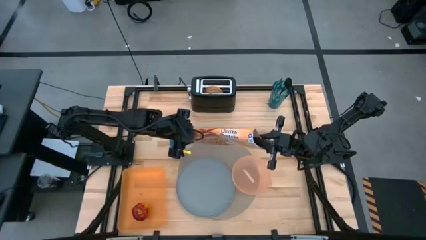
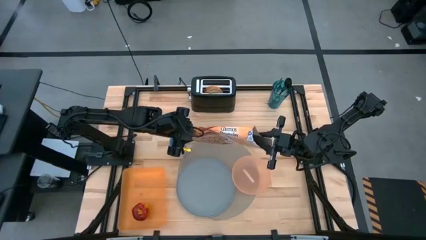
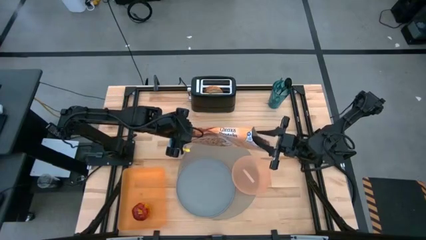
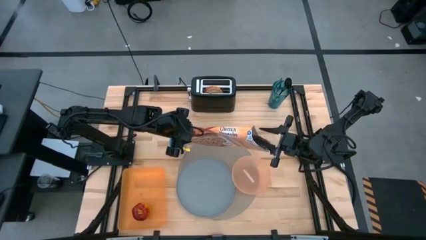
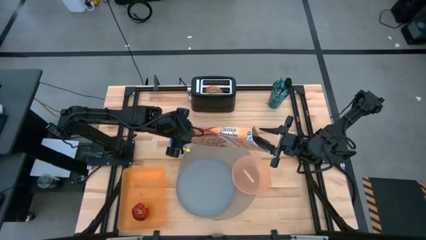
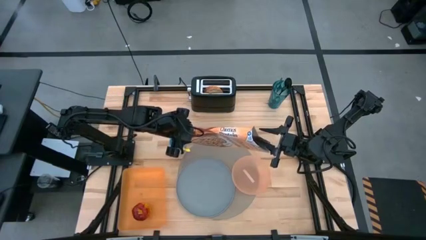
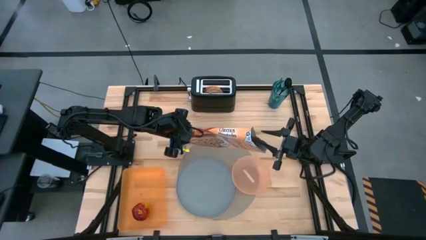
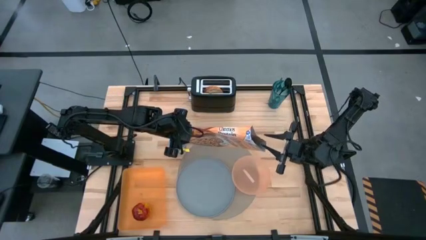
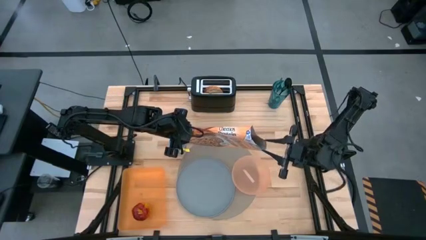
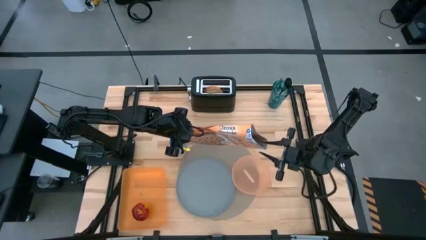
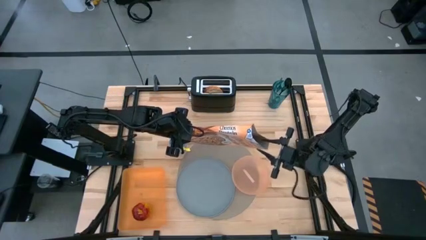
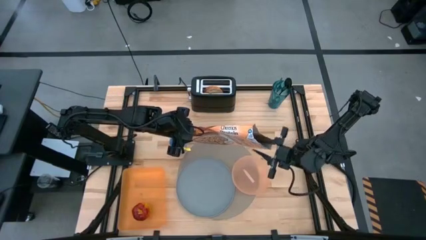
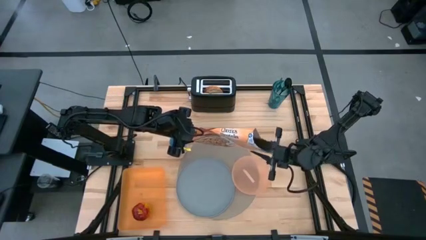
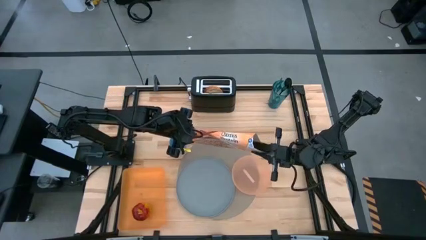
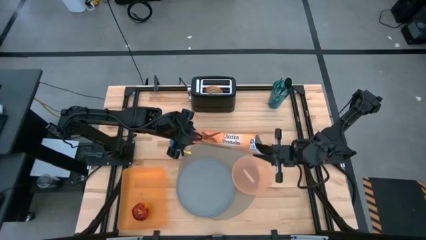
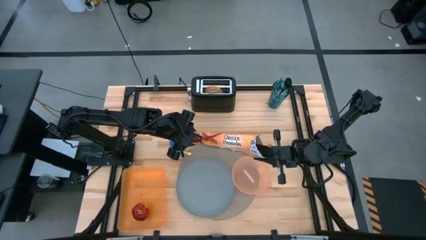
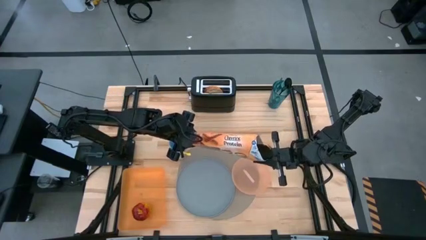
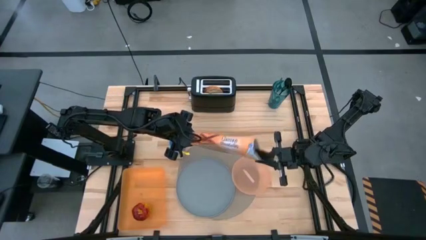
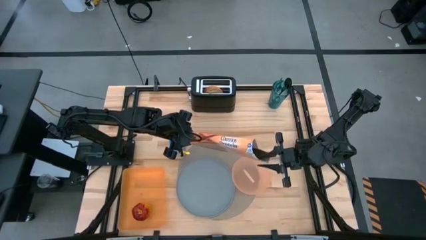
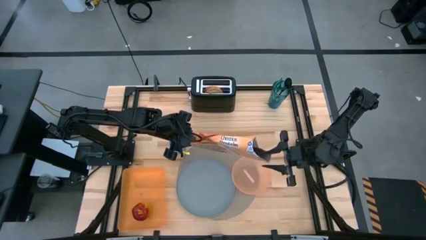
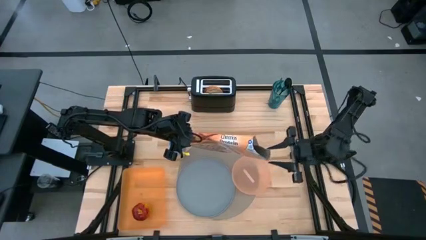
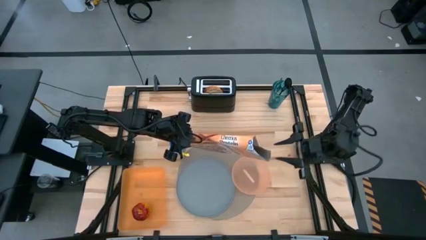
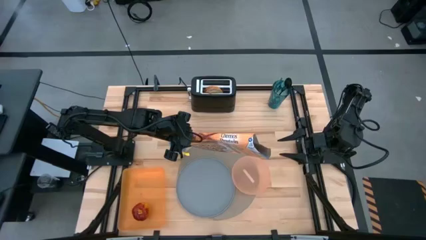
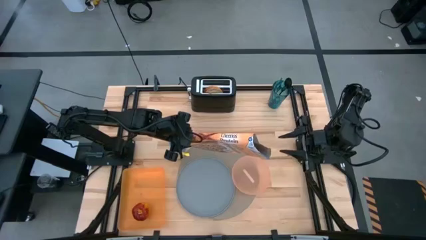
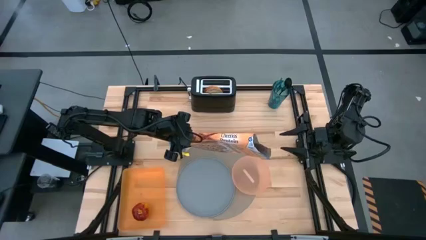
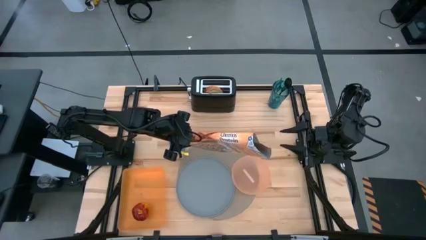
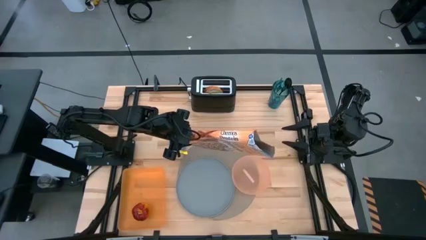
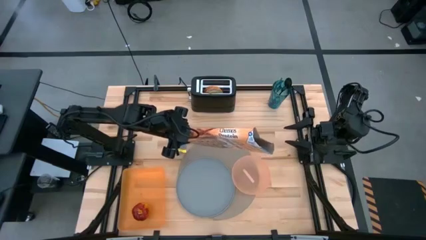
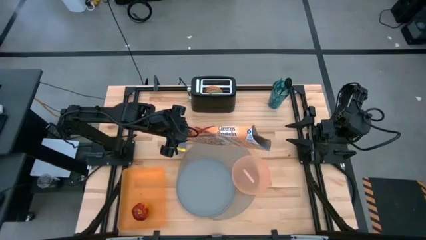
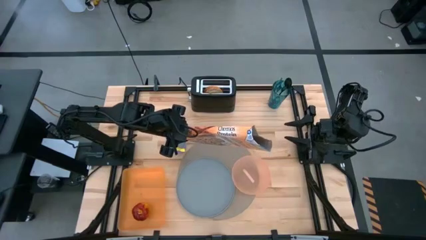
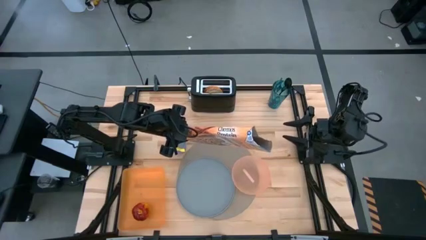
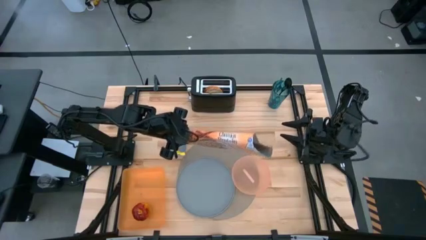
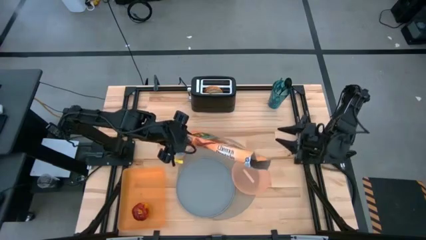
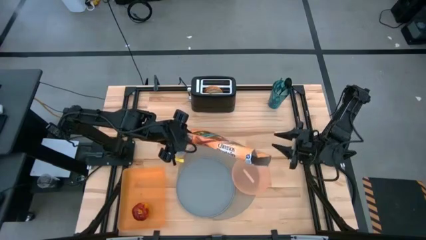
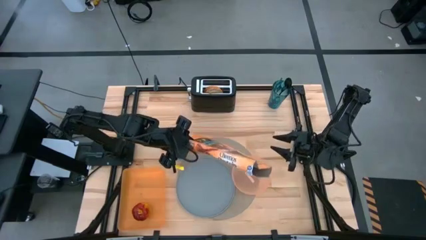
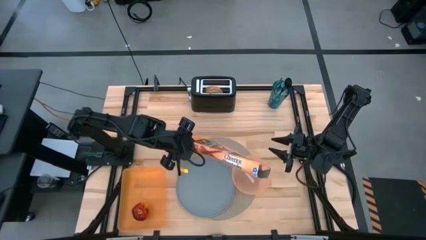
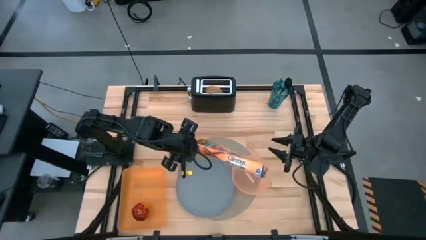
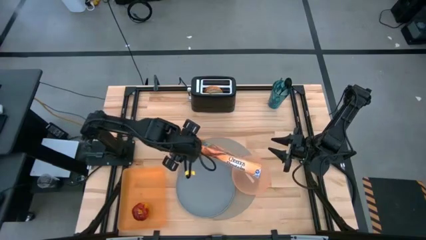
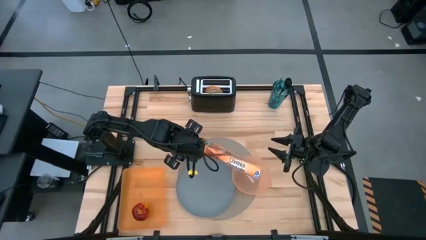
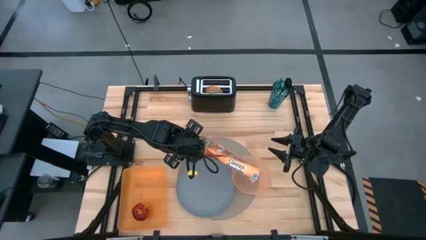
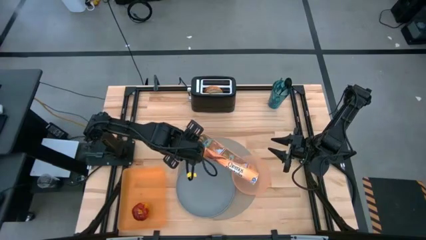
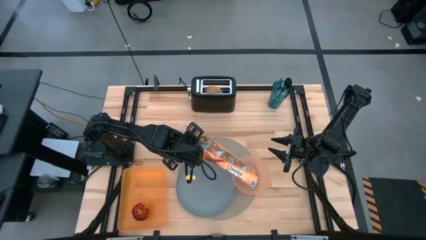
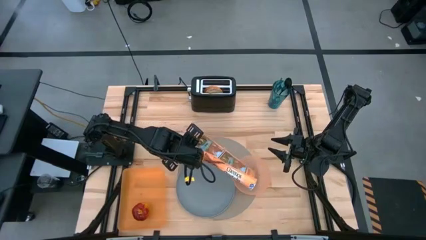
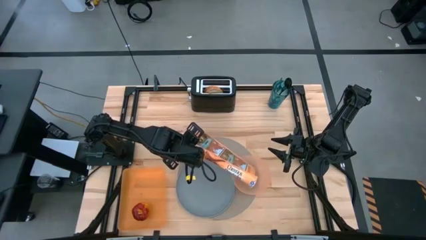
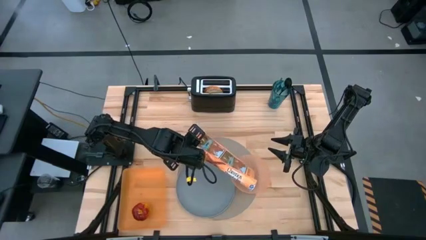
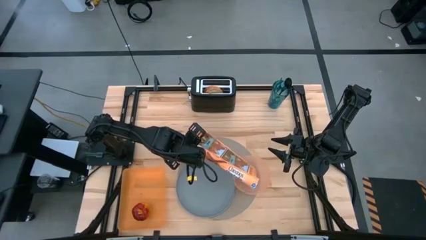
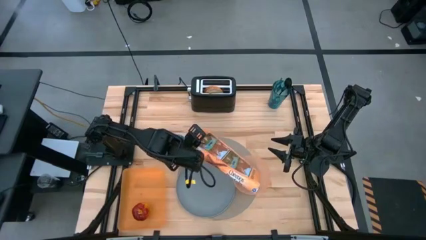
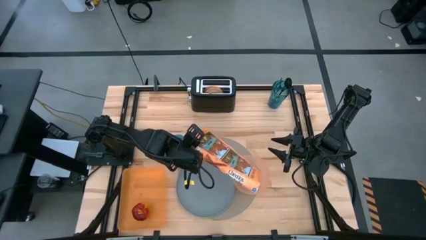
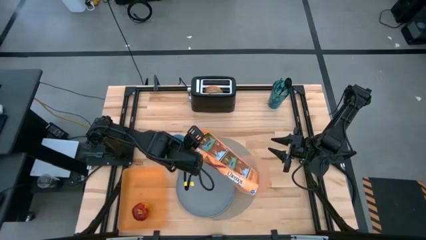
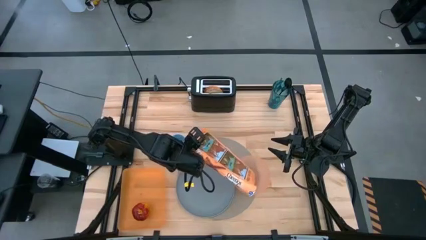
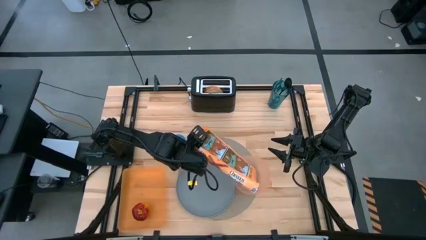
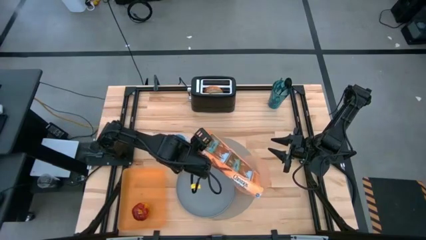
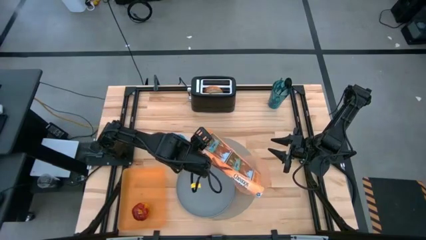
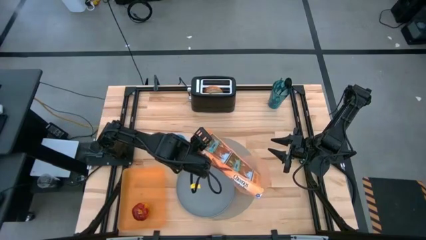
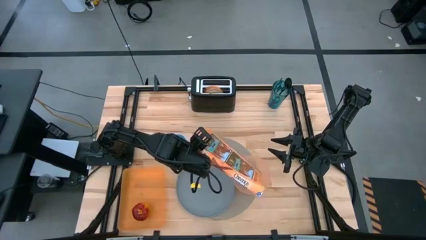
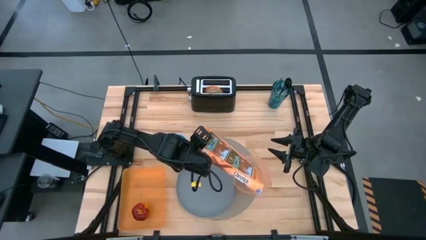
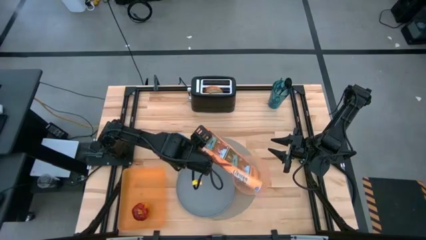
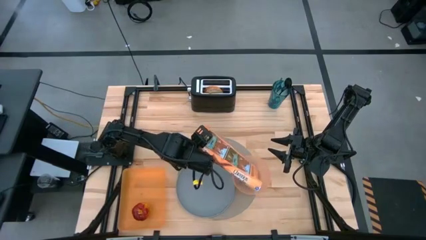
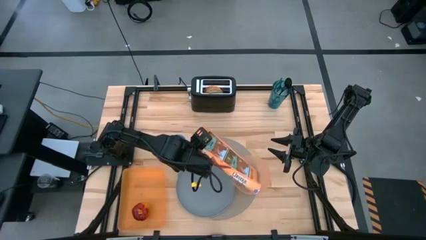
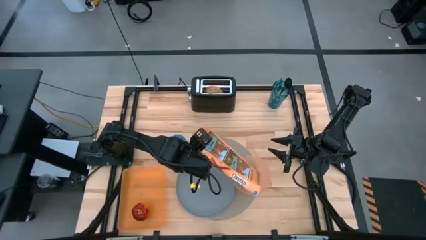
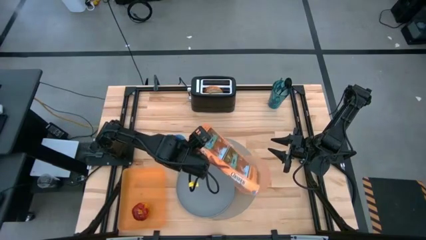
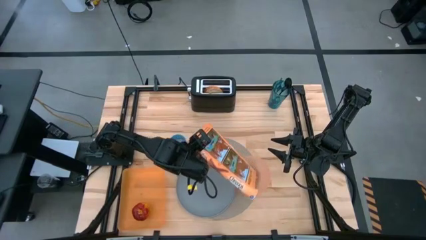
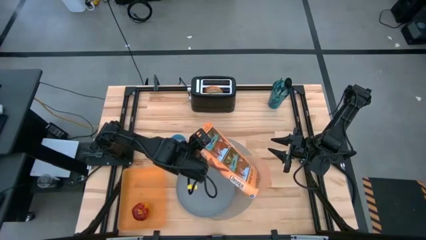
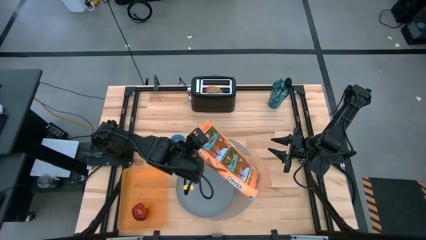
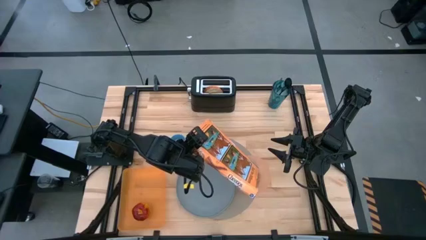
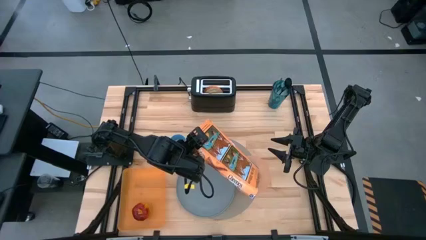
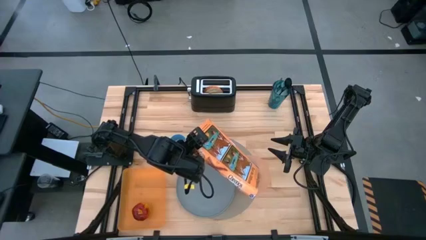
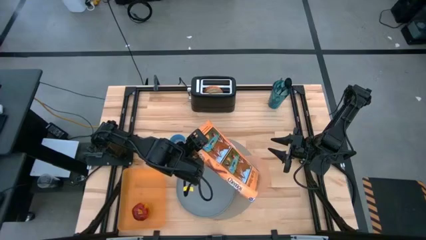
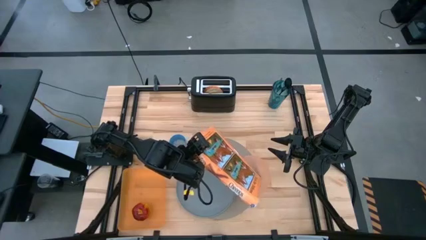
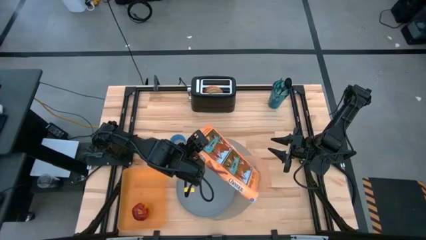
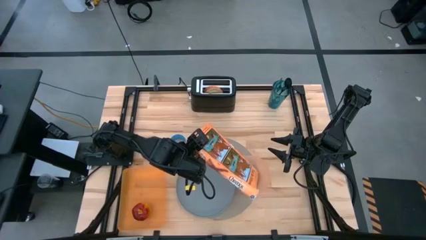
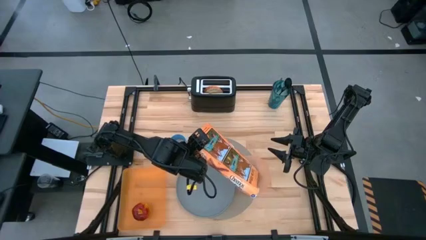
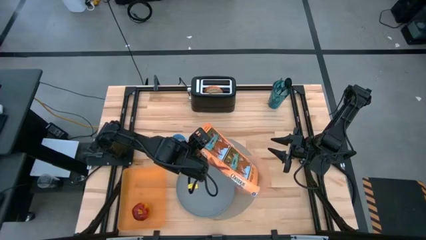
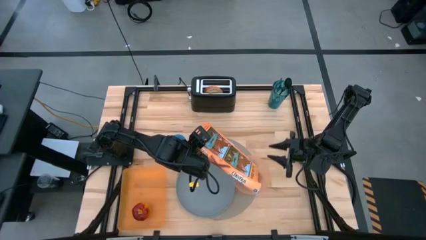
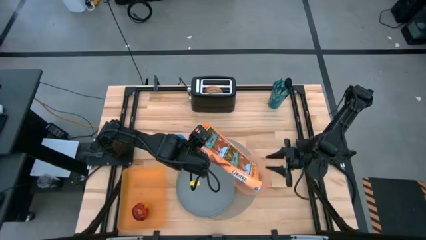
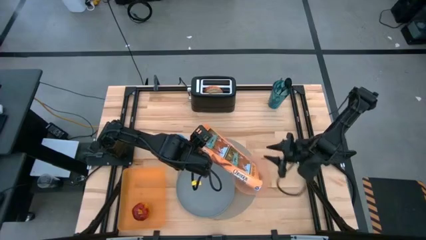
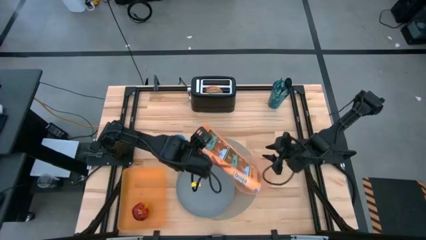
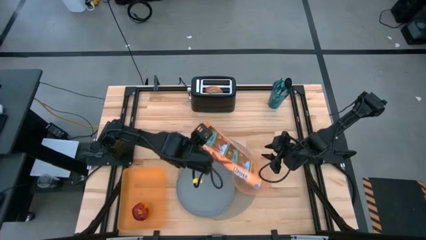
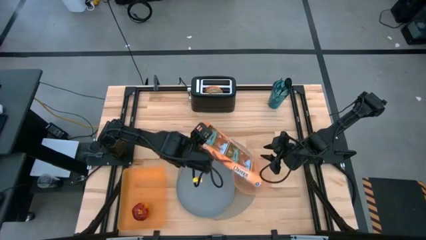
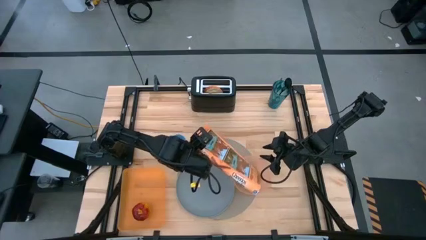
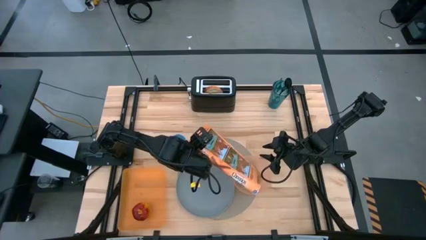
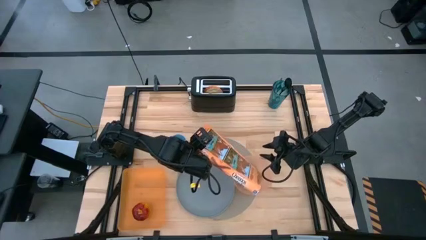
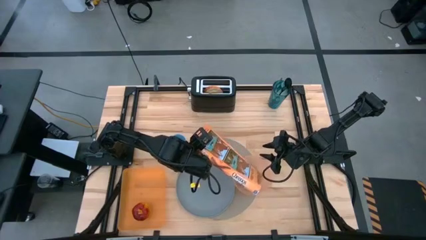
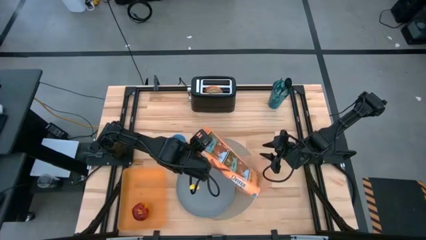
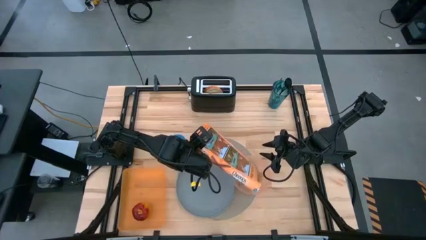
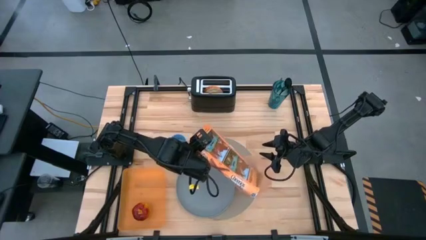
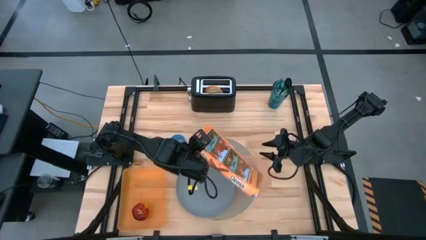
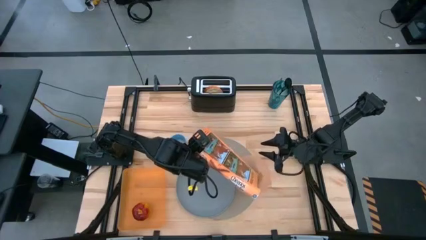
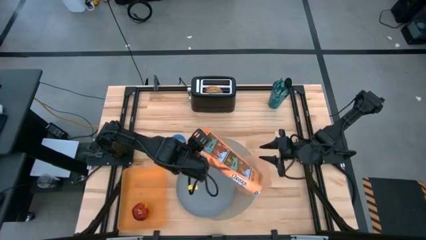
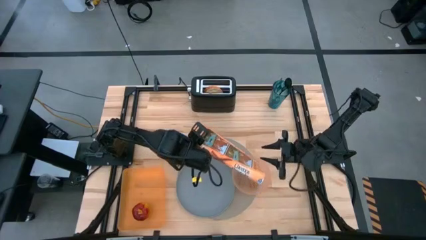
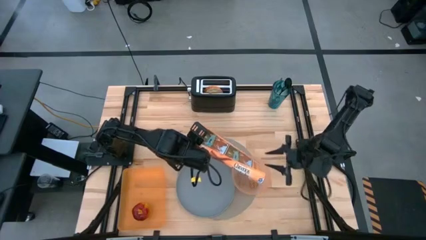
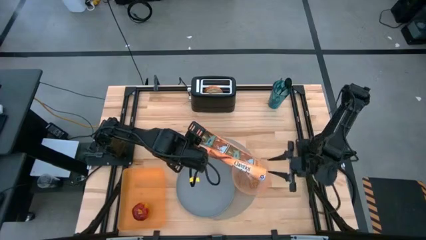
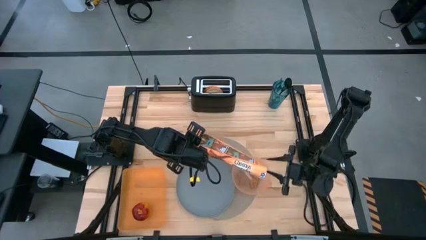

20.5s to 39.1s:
Task: Arrange a breakfast setting
Pour the cereal from the yellow cereal box into the orange bowl
